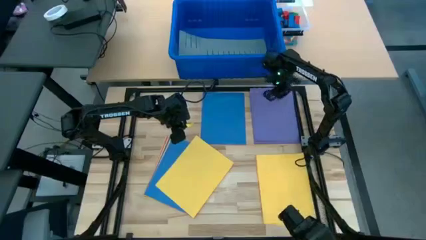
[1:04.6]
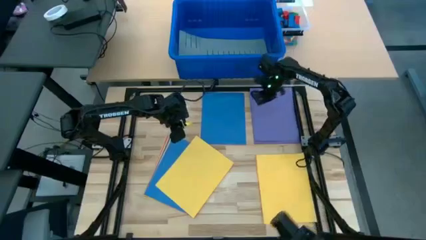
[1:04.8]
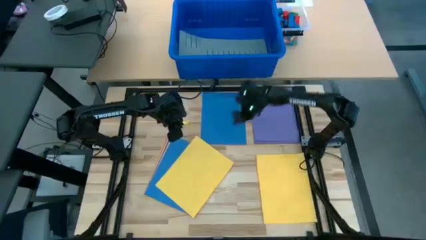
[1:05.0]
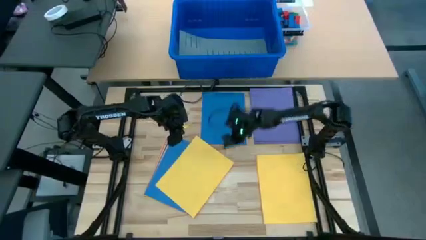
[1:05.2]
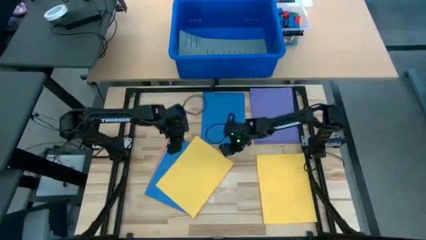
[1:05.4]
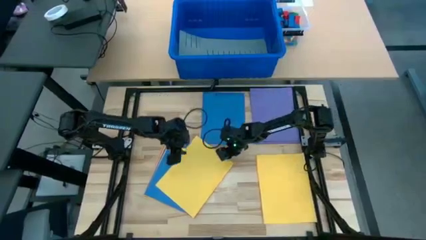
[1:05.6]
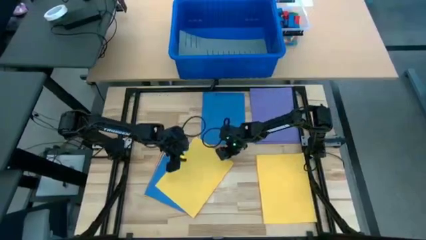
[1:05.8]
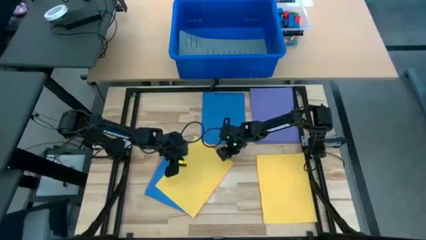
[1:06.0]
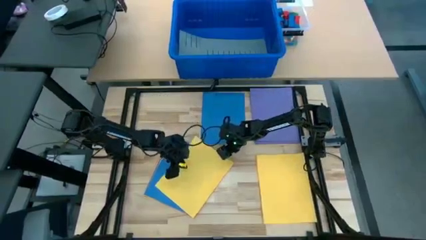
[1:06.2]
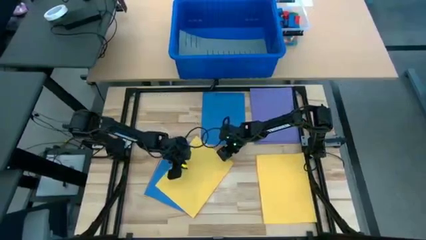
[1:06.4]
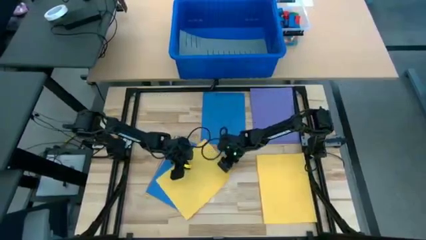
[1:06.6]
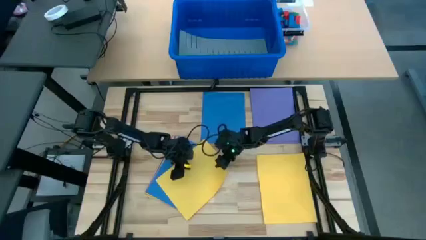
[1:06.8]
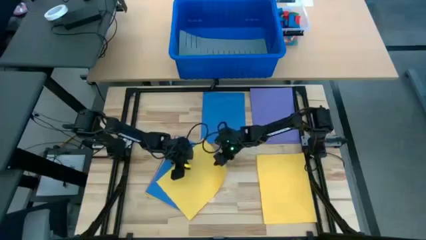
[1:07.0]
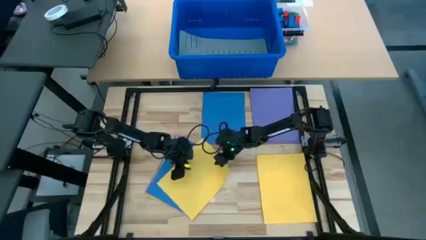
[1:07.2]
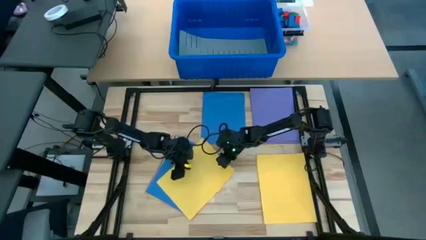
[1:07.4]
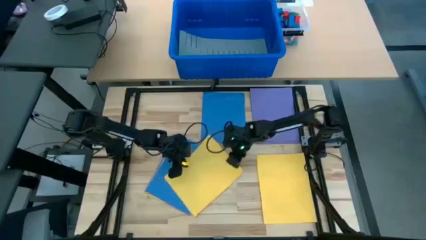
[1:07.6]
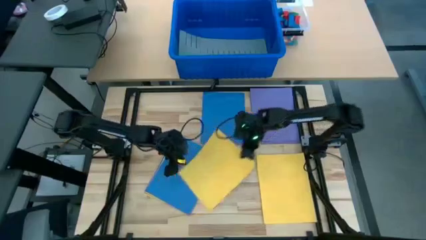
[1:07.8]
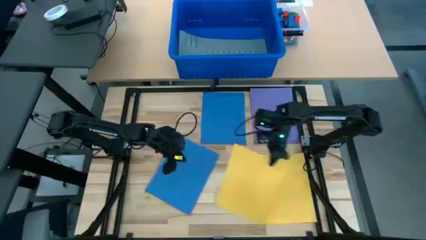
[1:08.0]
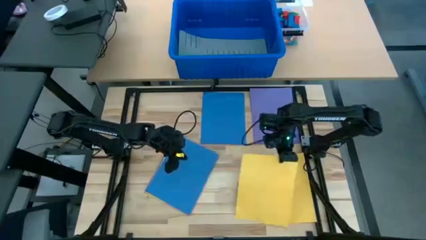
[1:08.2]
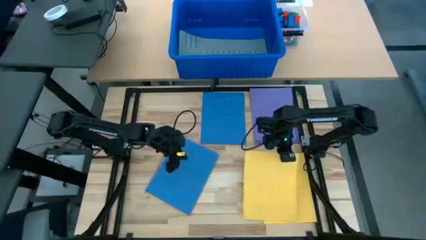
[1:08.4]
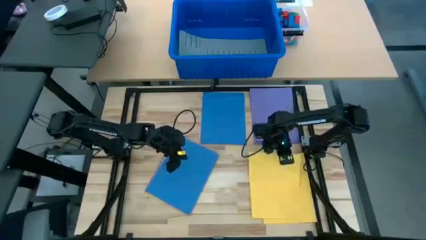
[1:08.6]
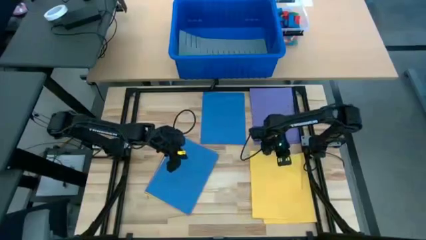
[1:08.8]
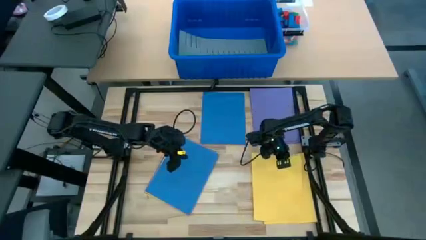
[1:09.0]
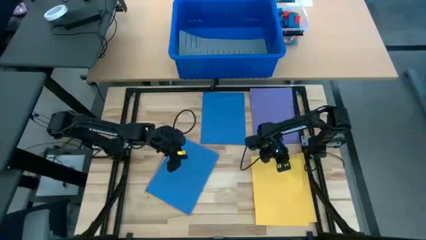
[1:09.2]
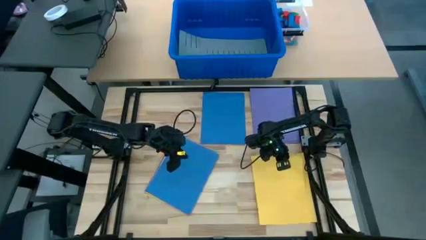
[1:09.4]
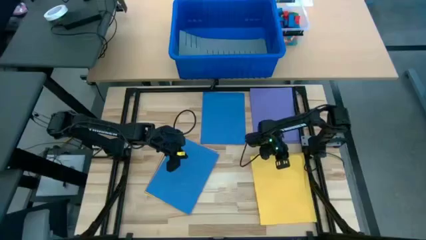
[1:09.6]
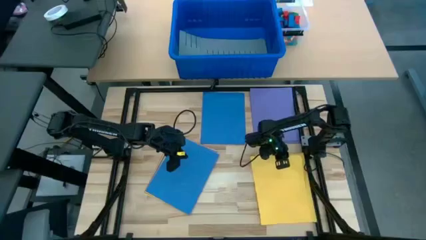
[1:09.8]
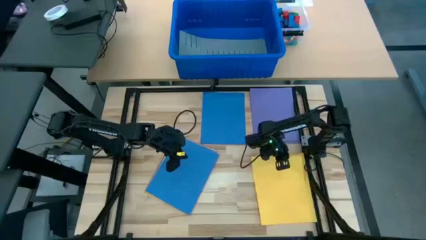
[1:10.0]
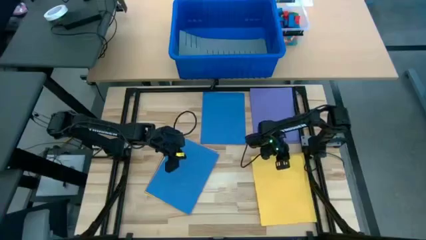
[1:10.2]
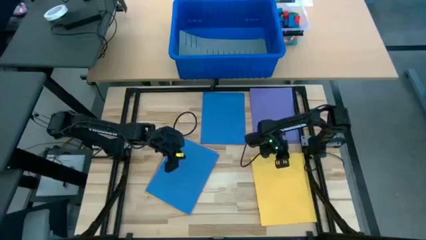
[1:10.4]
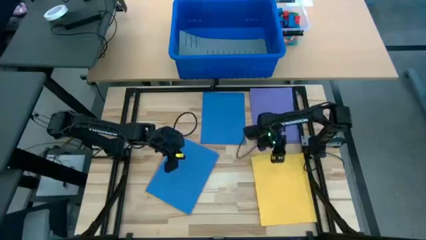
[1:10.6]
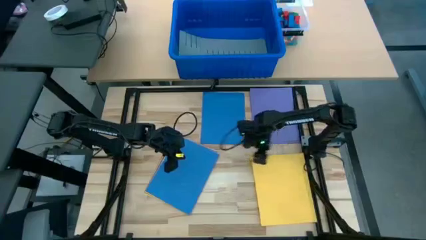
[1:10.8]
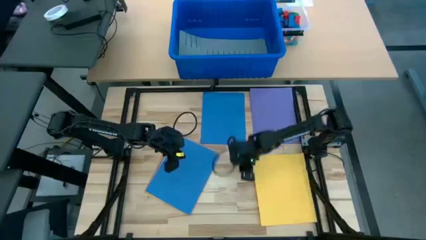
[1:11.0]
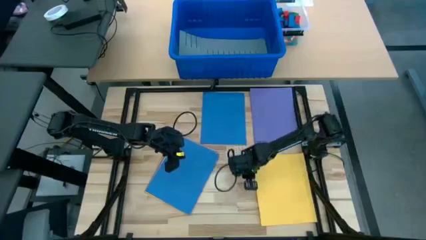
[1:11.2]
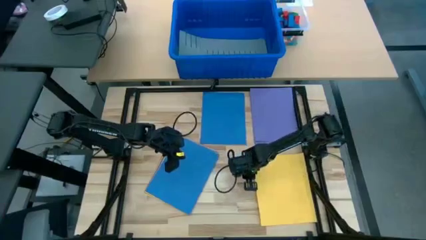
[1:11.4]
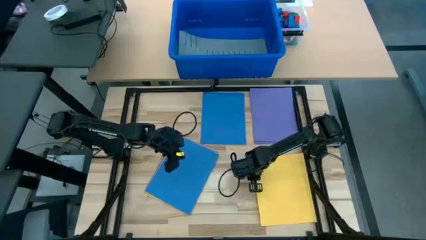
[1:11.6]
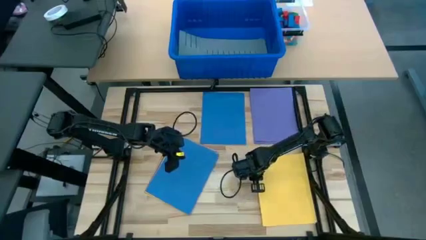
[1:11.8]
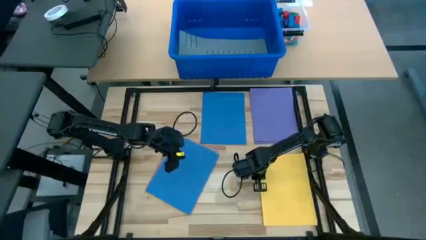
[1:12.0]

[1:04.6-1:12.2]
Task: Organize paper
Stack the yellow paper on top of the other yellow papers

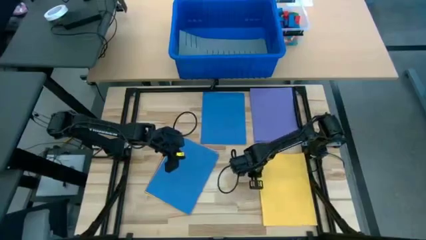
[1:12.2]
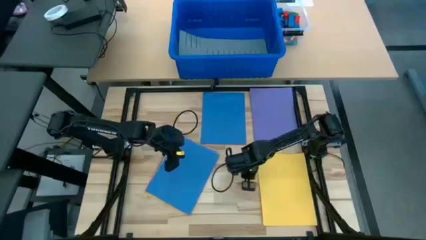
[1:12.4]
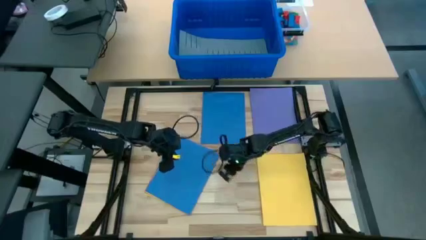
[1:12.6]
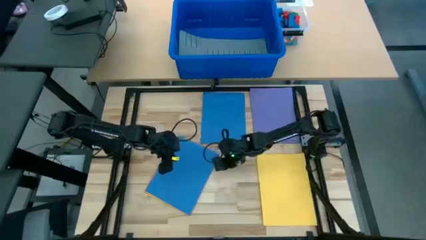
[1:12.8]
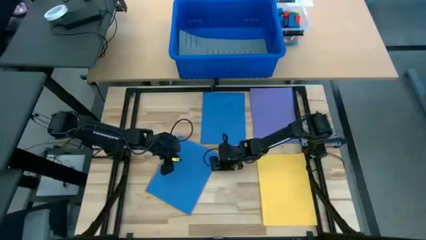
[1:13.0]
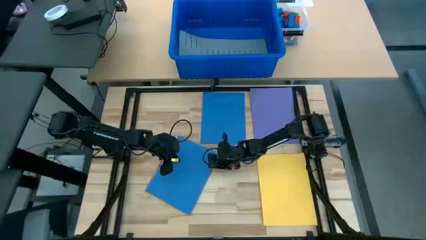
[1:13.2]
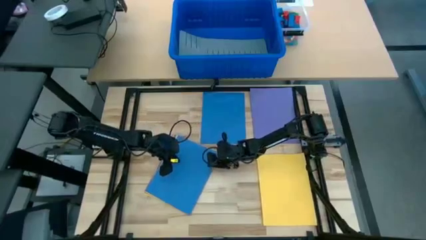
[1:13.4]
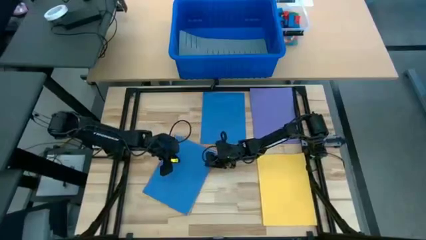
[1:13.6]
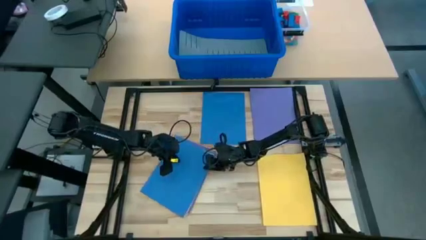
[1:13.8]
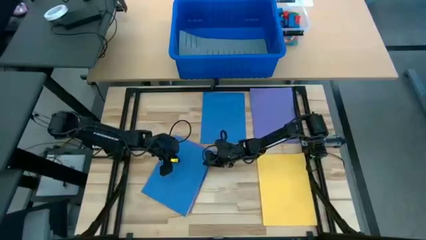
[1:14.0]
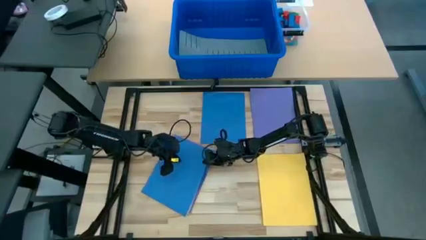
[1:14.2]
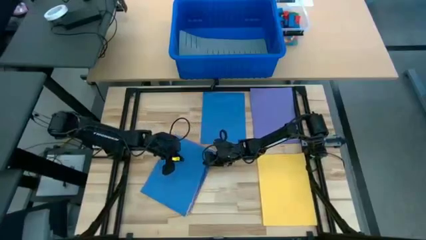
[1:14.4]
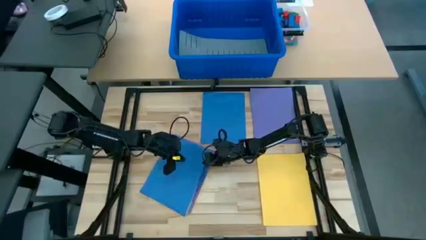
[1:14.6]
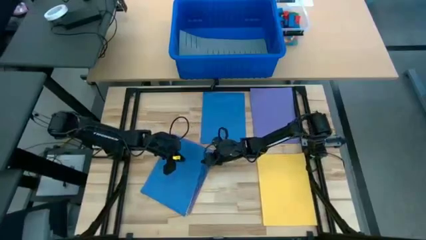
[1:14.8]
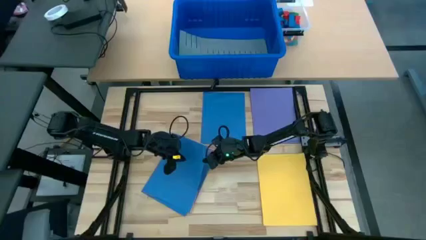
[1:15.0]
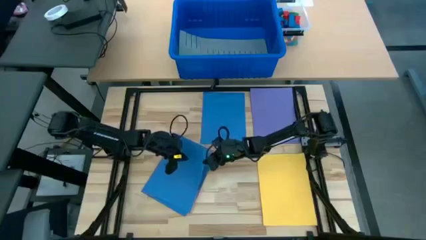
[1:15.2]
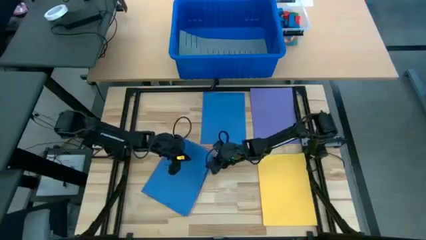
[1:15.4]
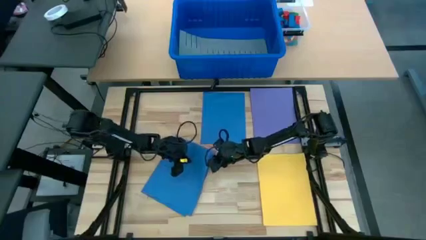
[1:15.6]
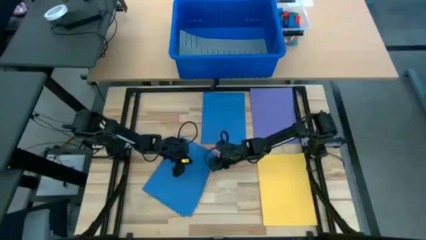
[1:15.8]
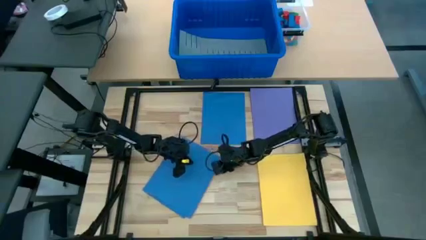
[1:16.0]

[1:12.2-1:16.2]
Stack the blue paper on top of the other blue paper

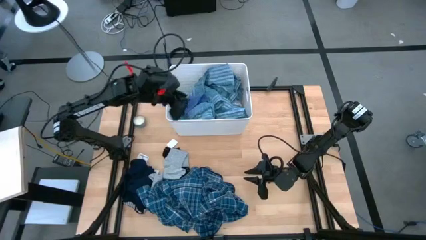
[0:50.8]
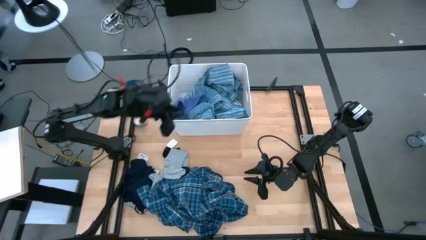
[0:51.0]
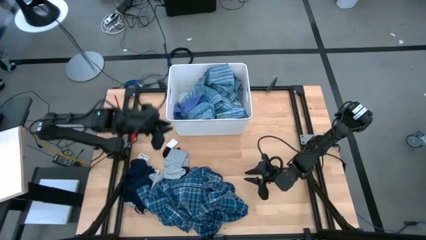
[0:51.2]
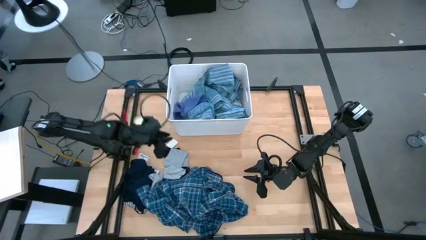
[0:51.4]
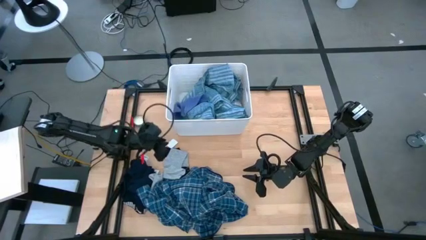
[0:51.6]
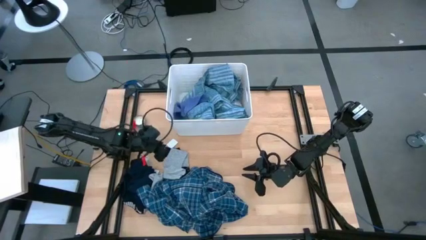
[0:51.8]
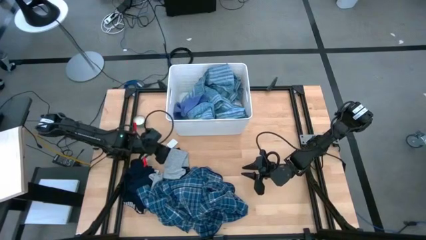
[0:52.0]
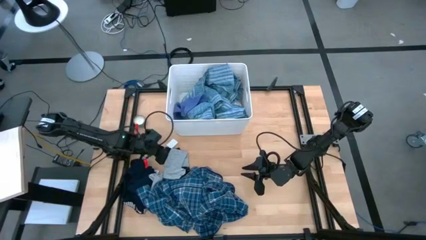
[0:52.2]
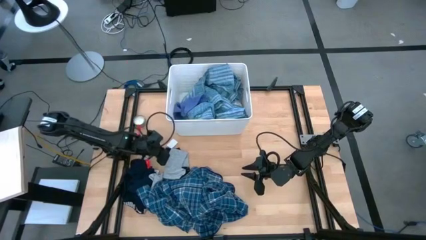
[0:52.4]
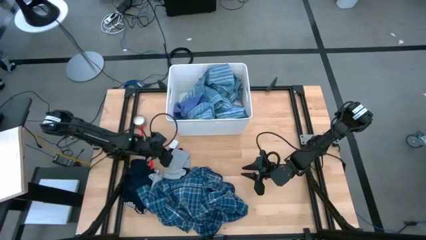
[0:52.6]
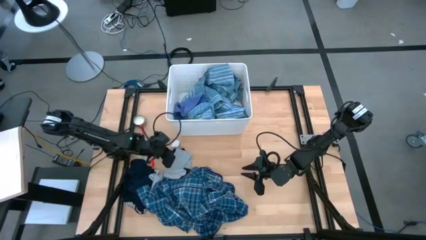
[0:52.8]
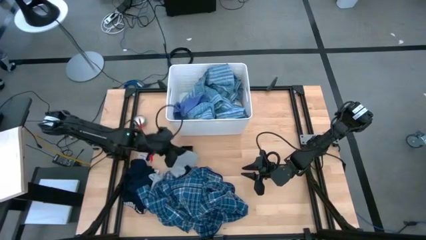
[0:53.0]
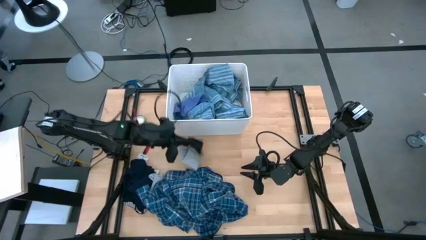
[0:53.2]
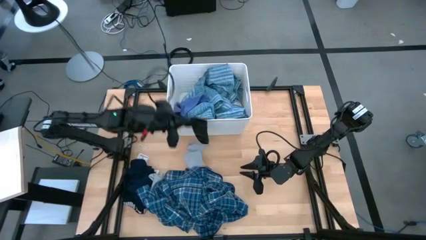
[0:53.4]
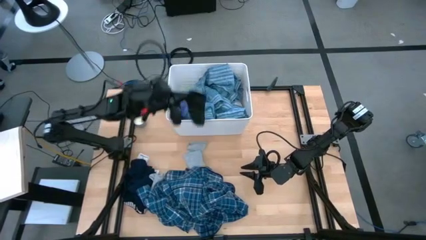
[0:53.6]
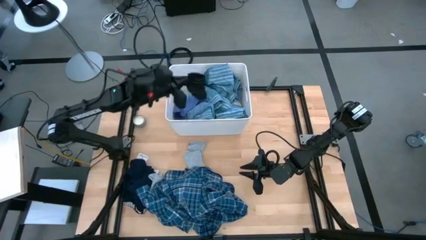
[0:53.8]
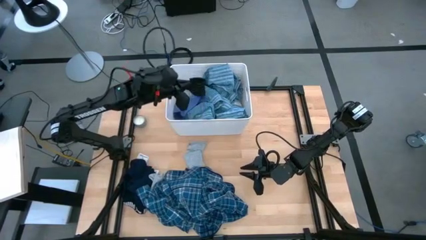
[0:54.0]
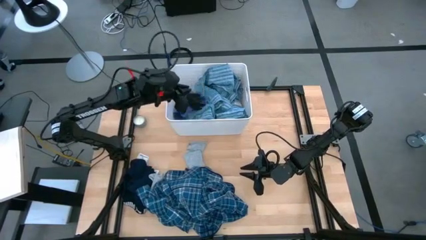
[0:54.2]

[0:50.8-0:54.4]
Task: Sort clothes
Put the black sock into the white laundry bin

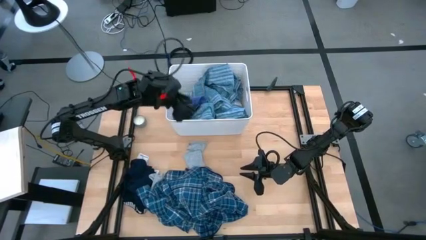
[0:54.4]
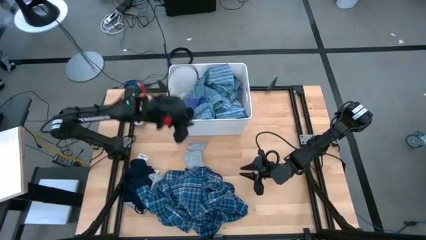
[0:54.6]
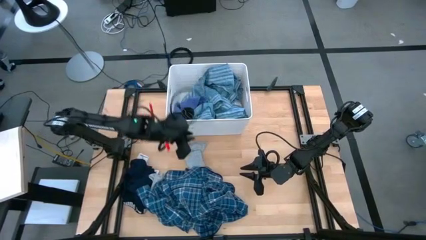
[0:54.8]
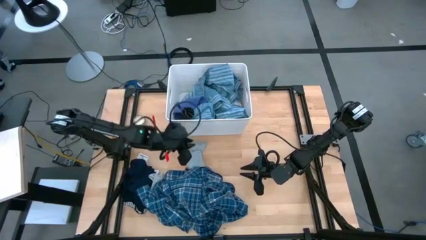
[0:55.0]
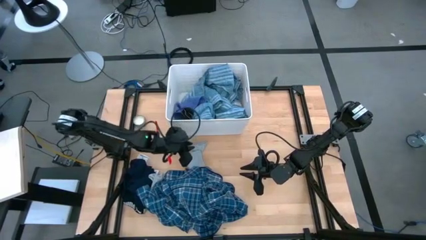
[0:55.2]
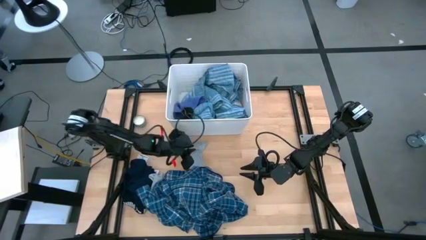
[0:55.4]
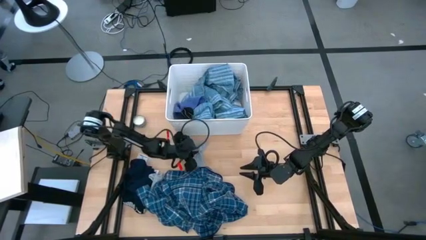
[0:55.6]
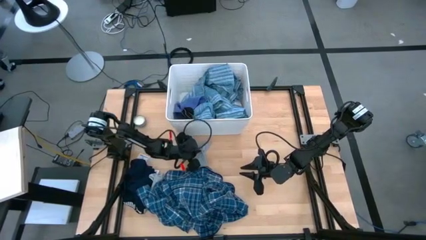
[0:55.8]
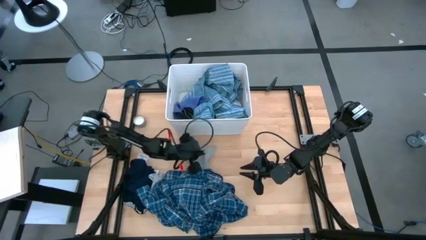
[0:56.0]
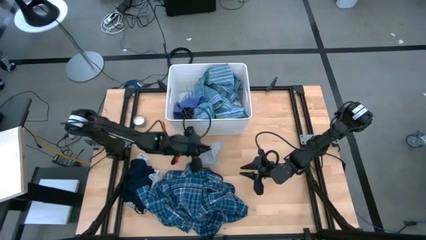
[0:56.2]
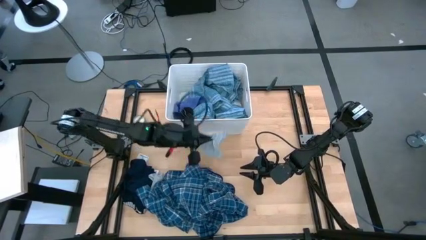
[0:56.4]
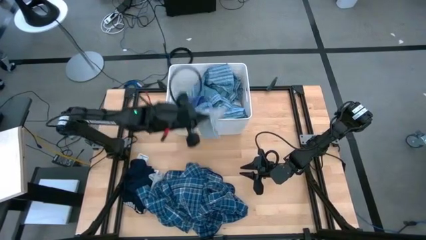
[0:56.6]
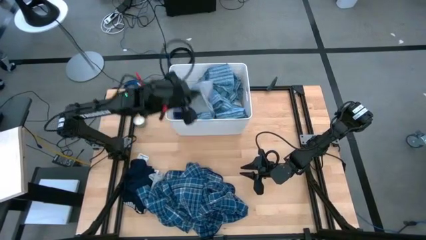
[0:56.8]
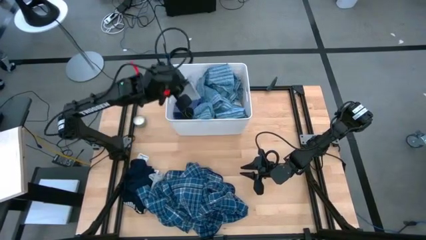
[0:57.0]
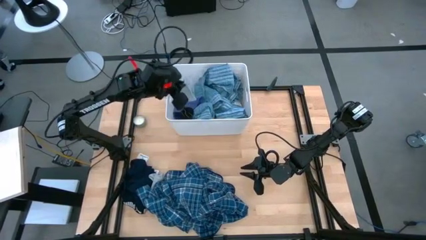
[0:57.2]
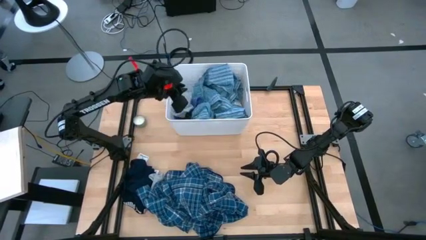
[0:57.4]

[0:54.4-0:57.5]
Put the top gray sock into the white laundry bin
